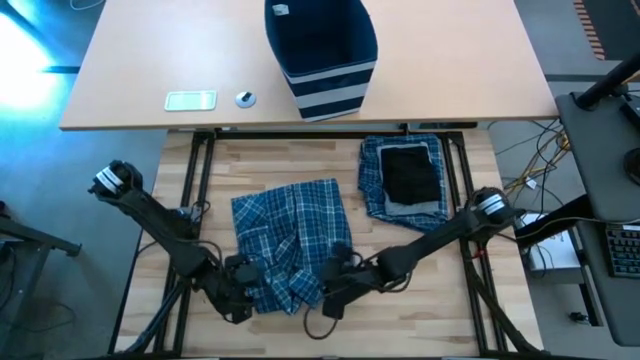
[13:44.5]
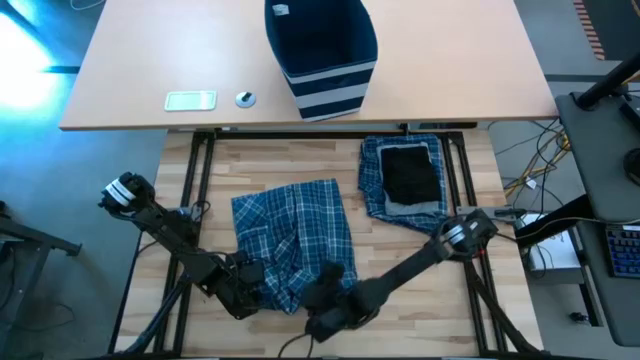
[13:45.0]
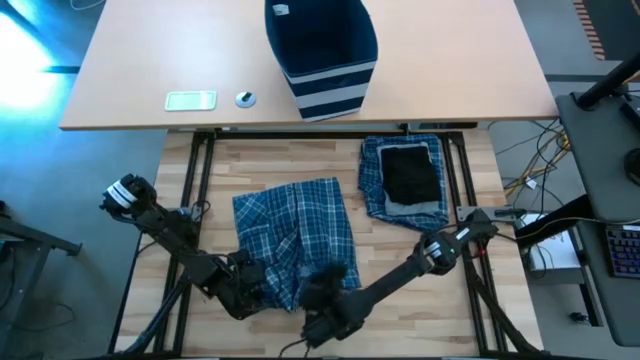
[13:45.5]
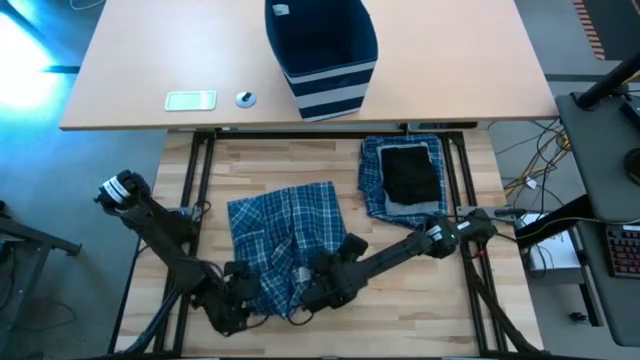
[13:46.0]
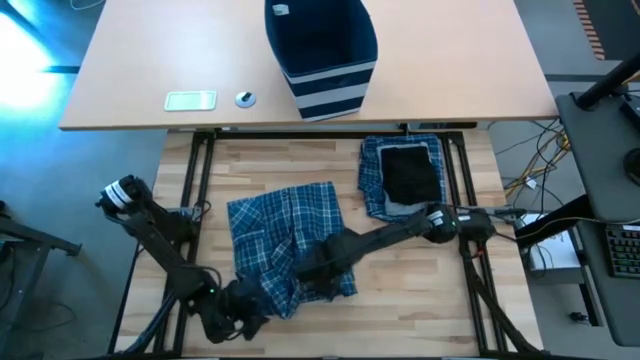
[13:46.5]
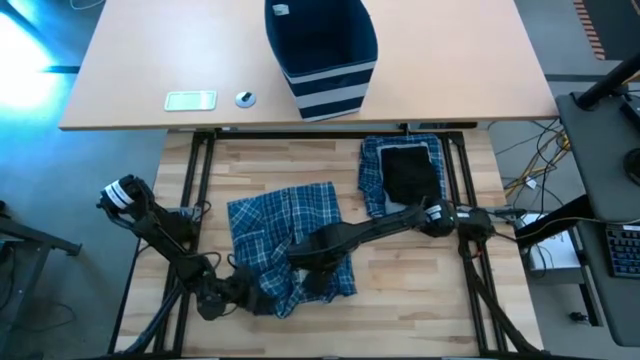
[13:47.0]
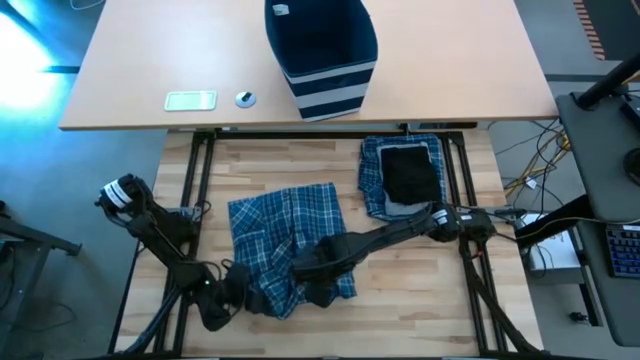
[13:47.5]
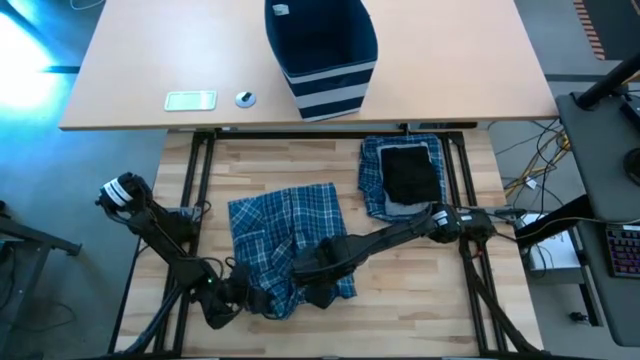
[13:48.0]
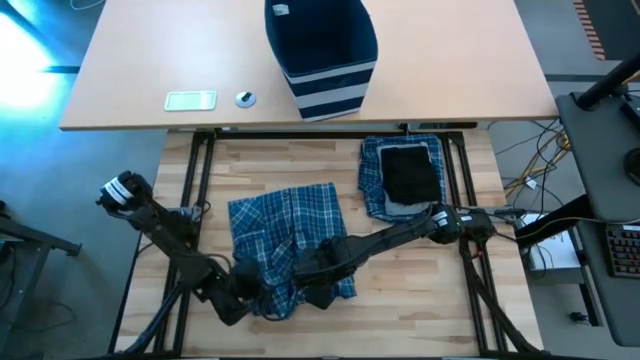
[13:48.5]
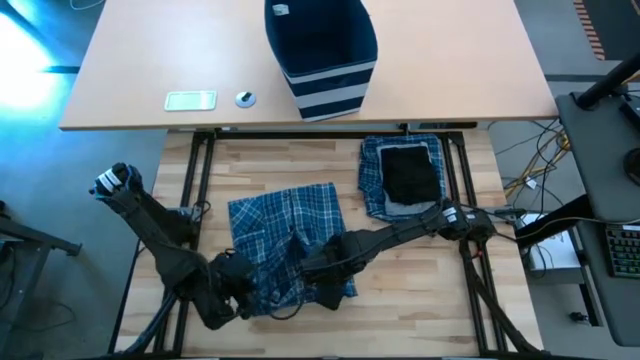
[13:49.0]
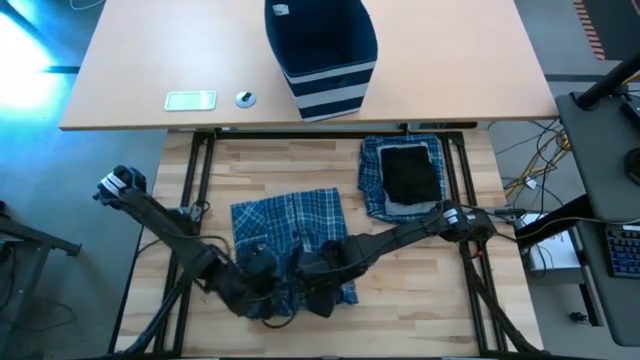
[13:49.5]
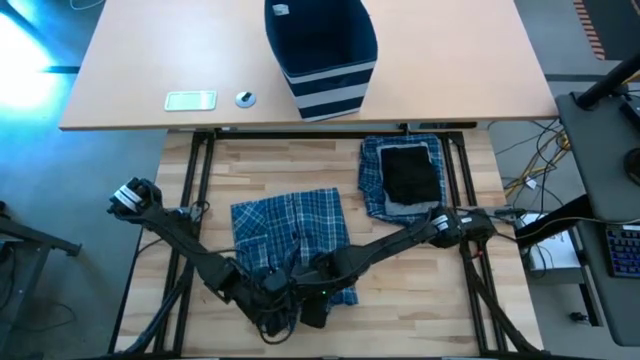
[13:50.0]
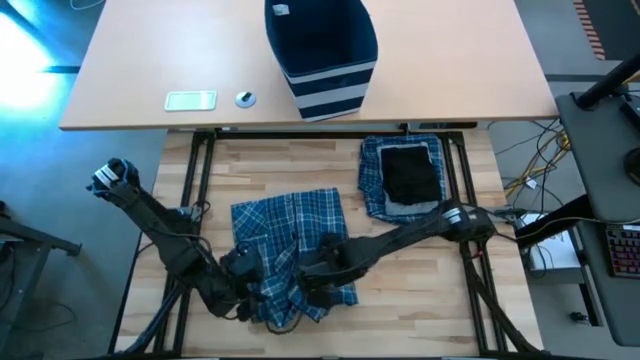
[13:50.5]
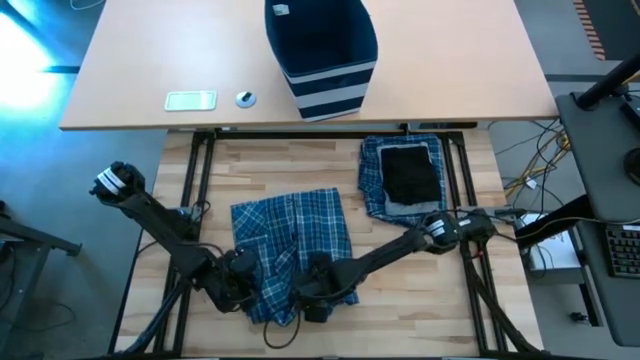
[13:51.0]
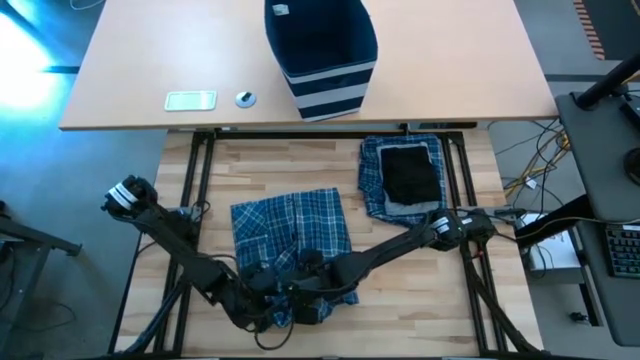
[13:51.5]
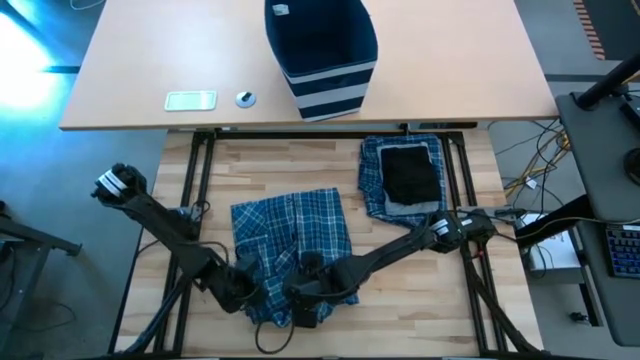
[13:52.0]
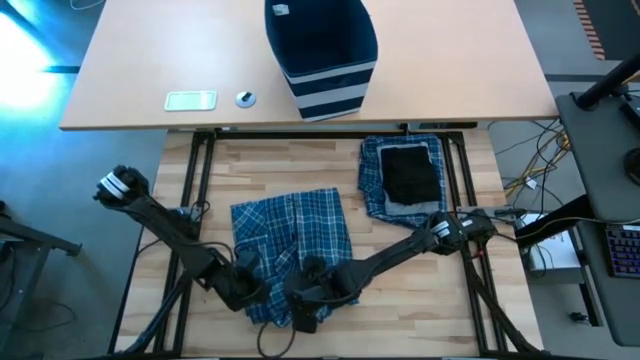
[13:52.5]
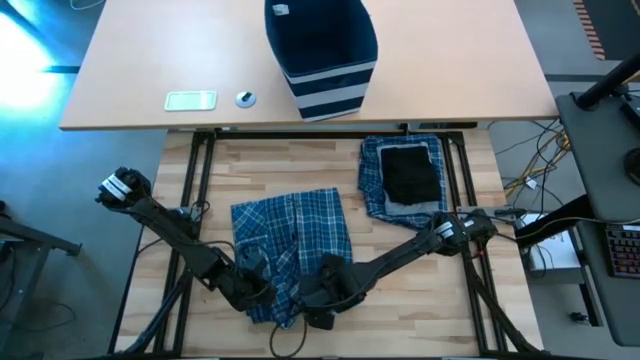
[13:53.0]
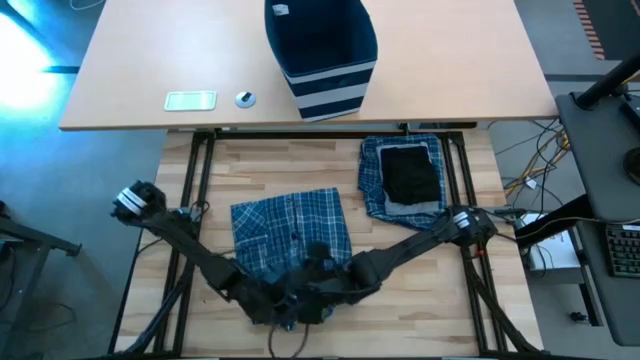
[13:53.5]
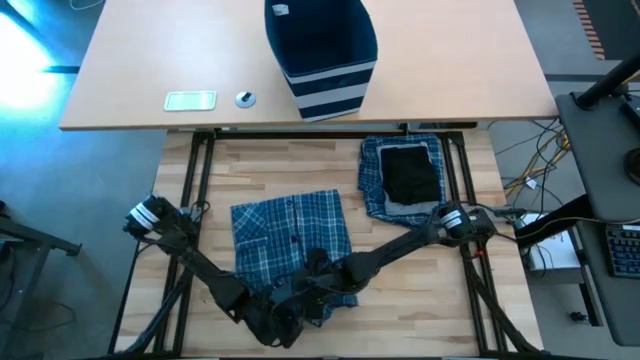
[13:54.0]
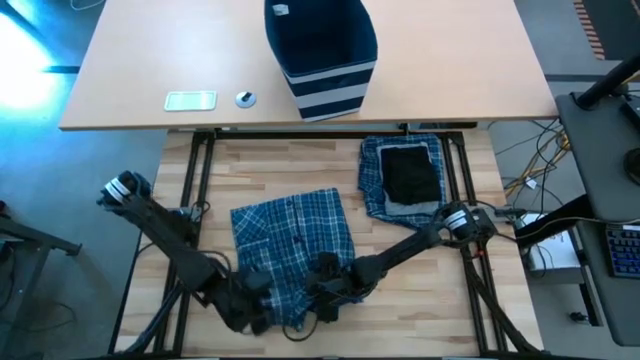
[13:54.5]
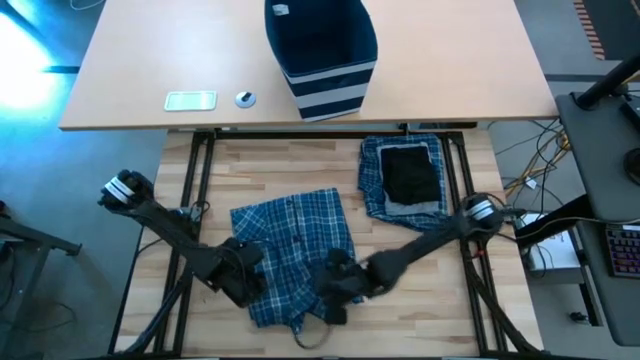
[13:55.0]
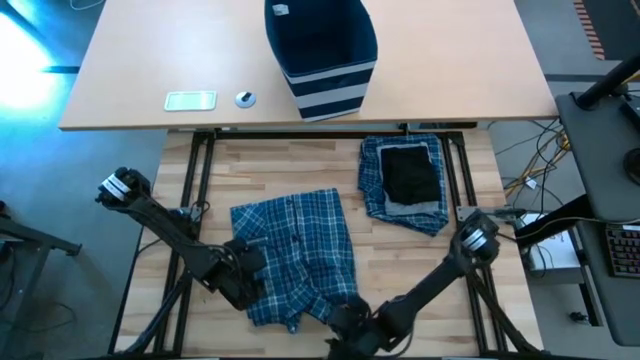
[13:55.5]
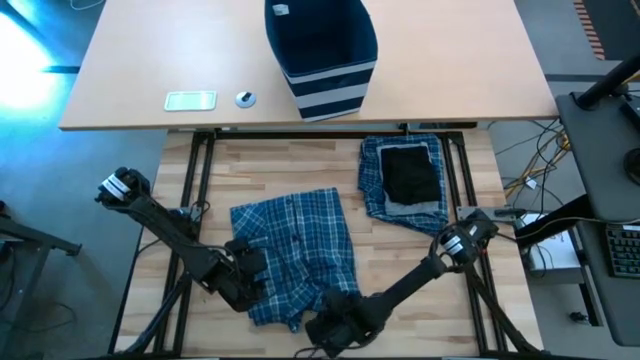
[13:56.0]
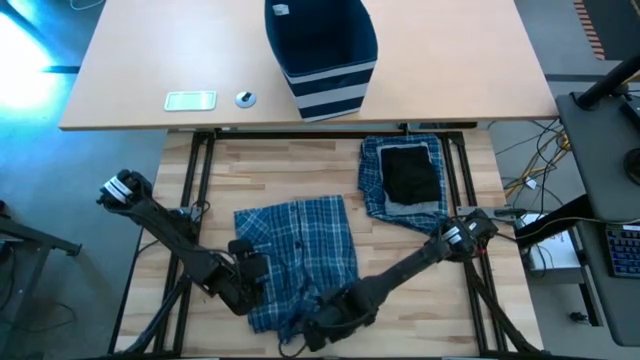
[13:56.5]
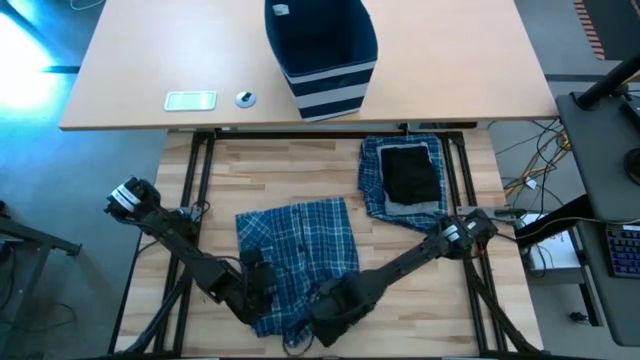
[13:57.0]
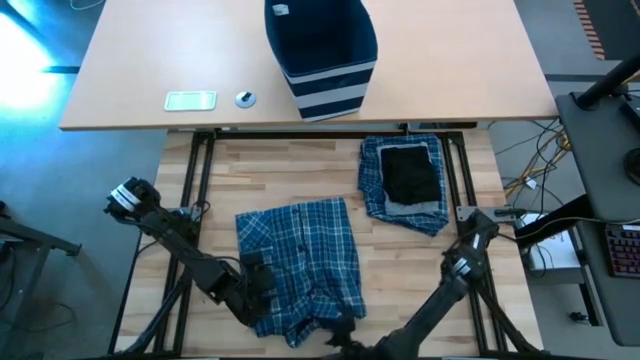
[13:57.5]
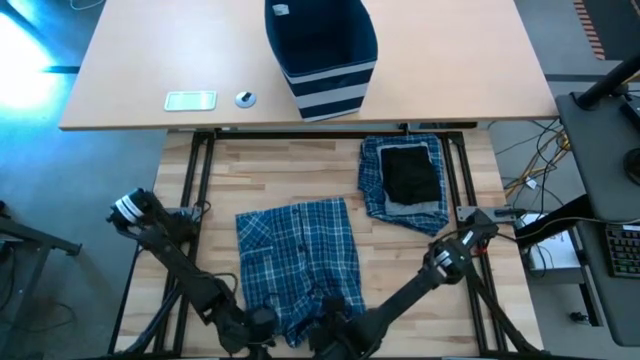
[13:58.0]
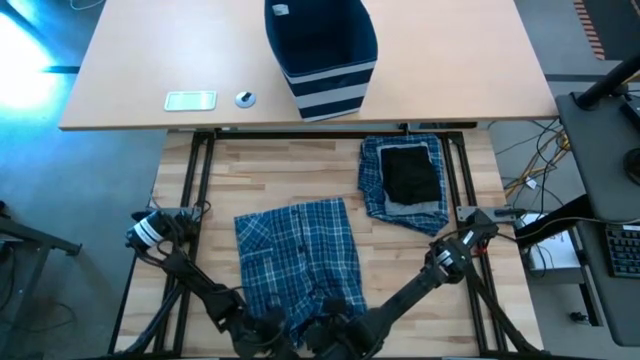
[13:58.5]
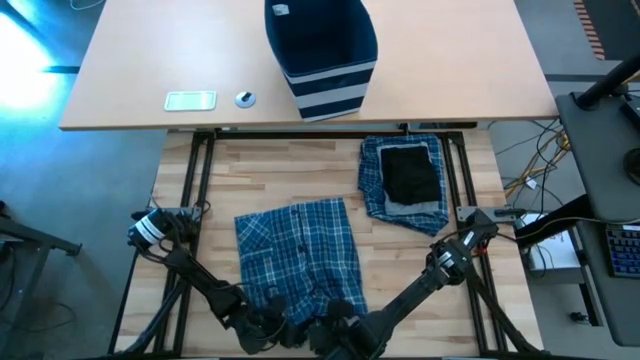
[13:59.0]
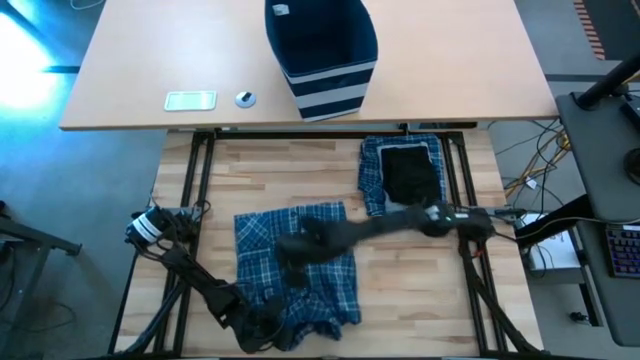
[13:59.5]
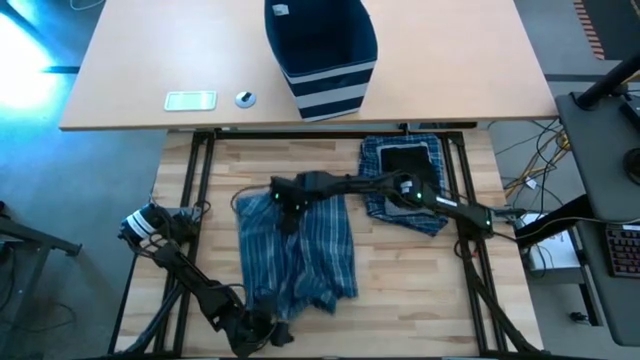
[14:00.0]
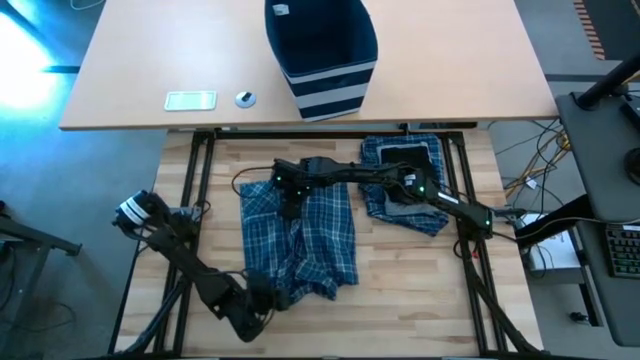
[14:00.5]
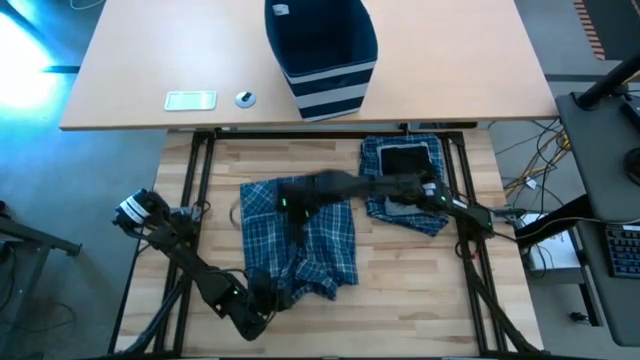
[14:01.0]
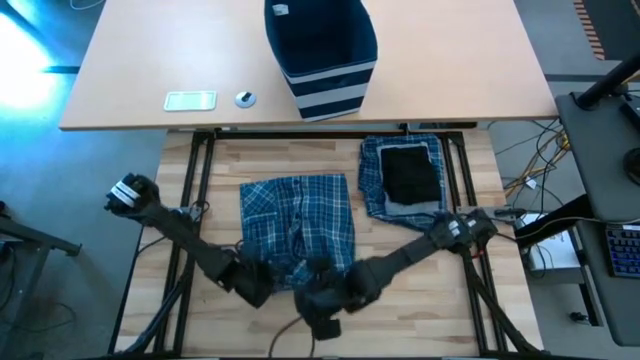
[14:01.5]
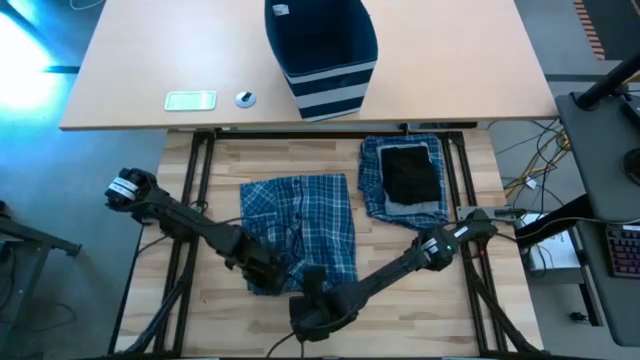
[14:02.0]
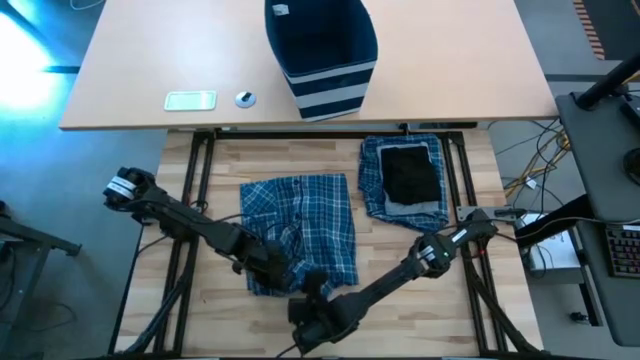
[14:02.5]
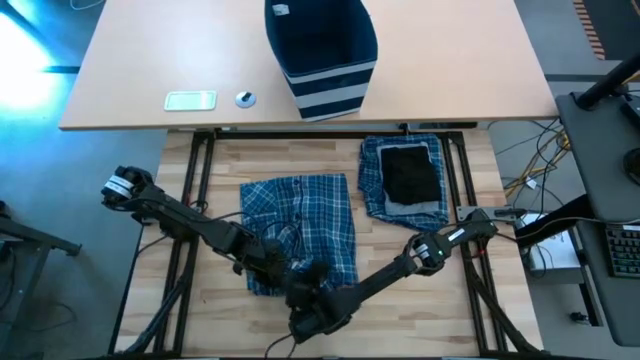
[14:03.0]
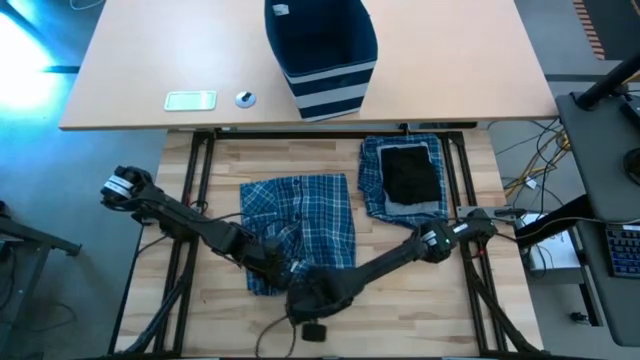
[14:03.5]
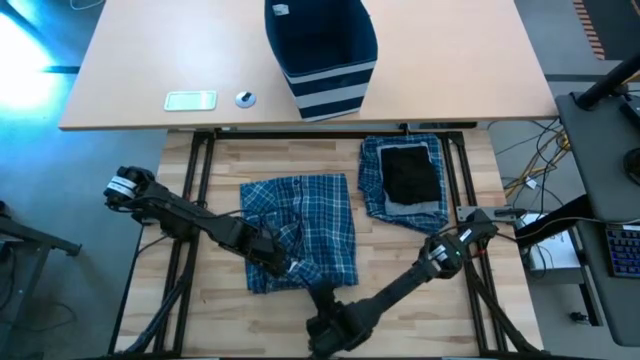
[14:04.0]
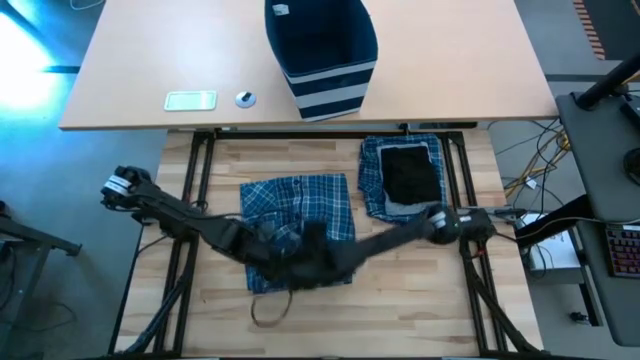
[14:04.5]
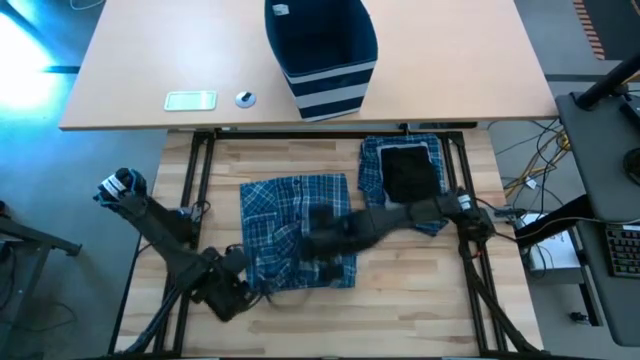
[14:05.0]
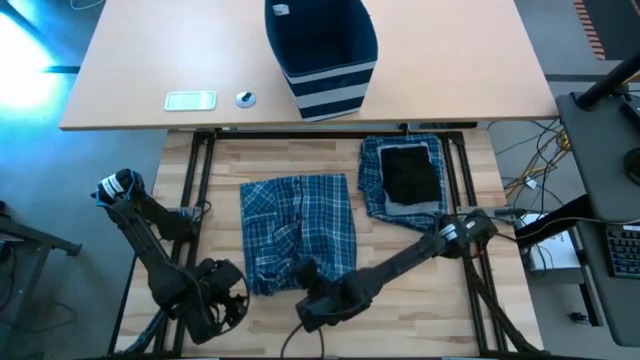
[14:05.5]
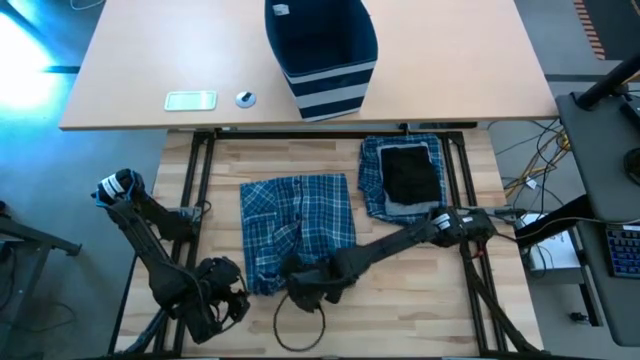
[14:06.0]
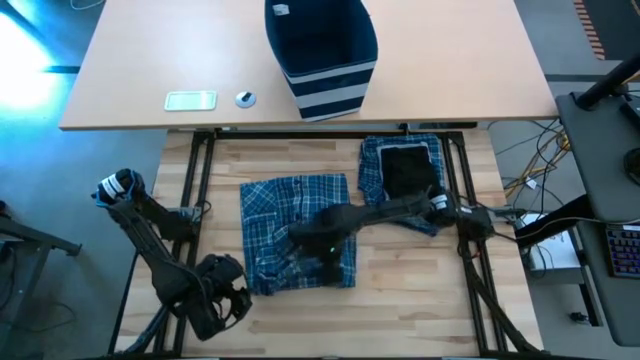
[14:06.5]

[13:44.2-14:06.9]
Task: Fold Laundry from Bin
Fold the blue patterned long sleeve
